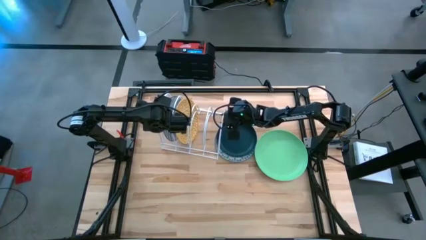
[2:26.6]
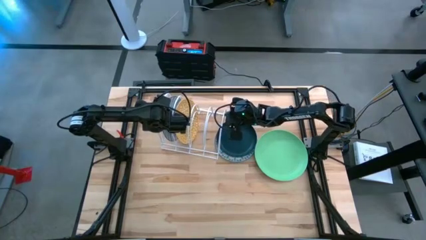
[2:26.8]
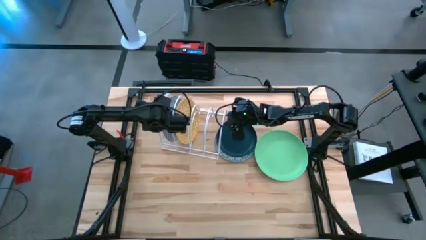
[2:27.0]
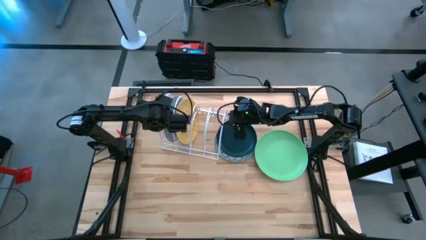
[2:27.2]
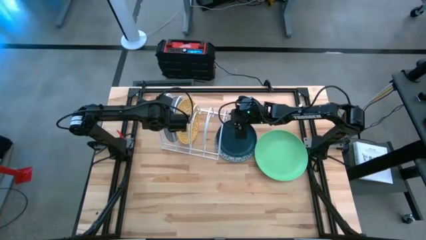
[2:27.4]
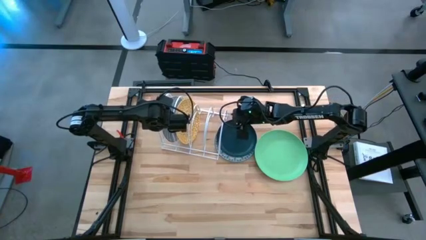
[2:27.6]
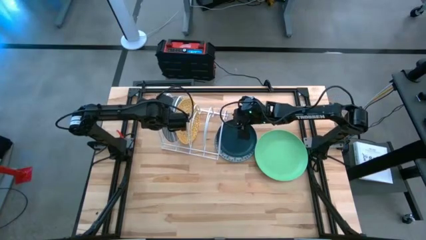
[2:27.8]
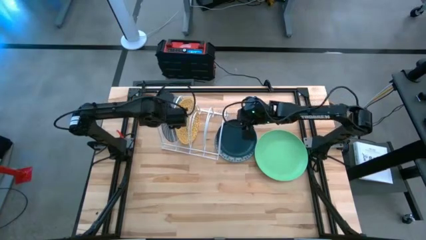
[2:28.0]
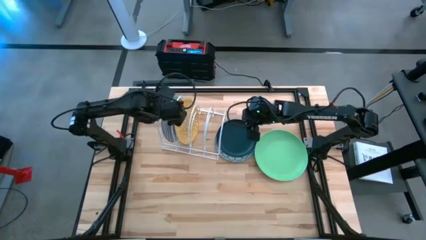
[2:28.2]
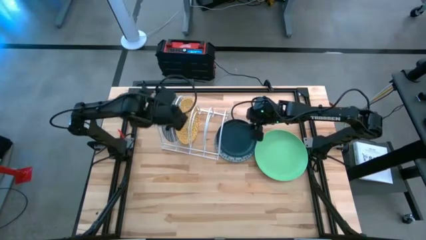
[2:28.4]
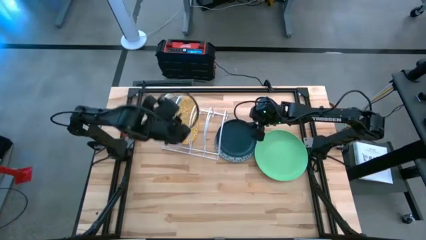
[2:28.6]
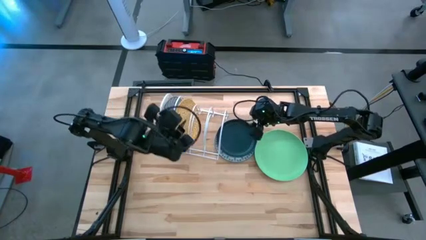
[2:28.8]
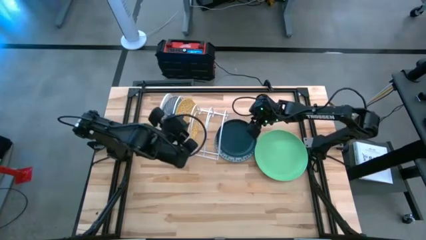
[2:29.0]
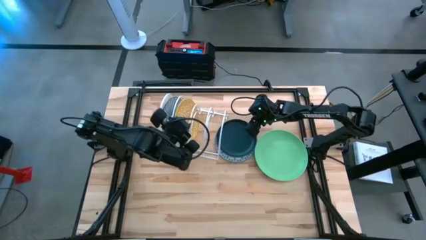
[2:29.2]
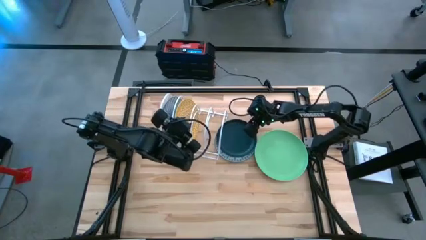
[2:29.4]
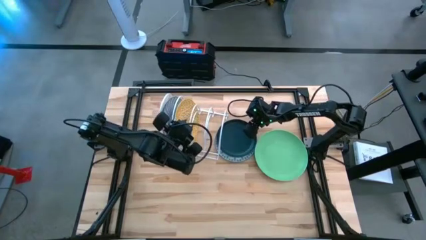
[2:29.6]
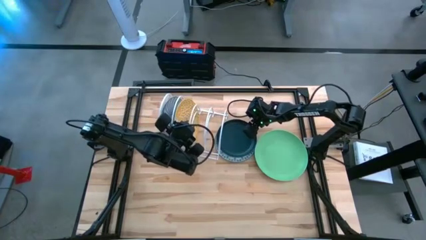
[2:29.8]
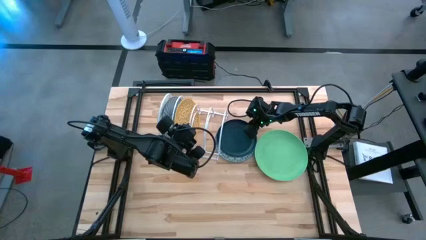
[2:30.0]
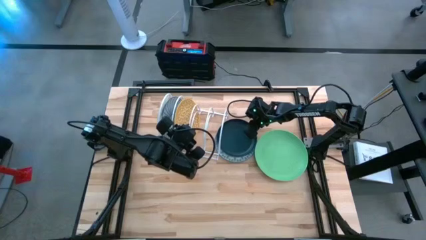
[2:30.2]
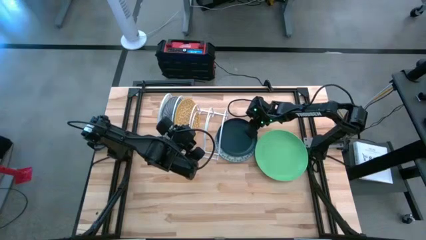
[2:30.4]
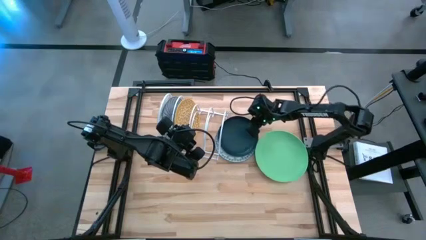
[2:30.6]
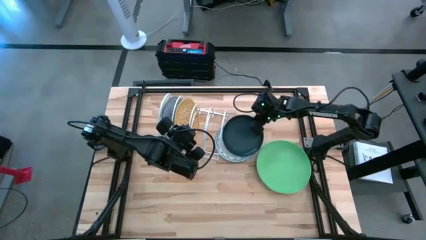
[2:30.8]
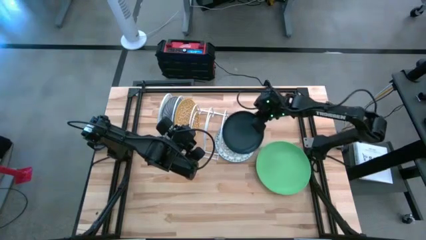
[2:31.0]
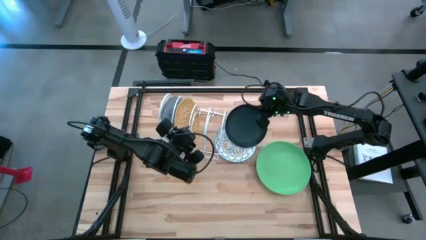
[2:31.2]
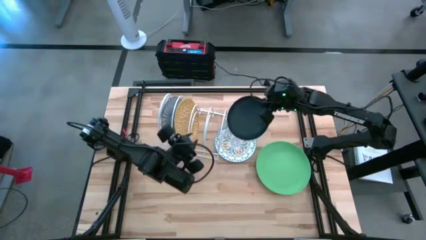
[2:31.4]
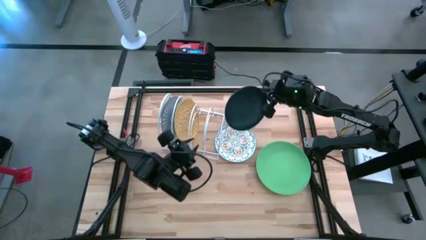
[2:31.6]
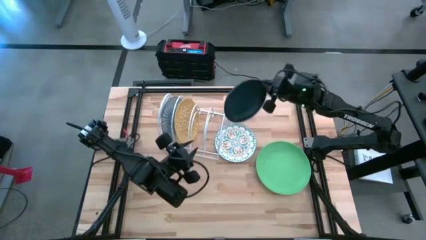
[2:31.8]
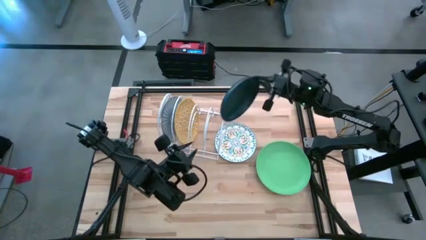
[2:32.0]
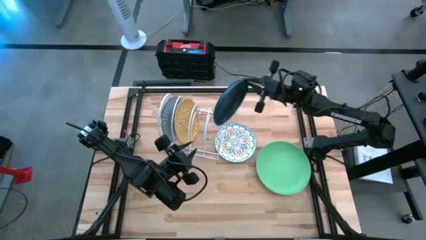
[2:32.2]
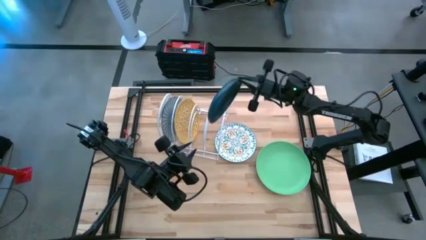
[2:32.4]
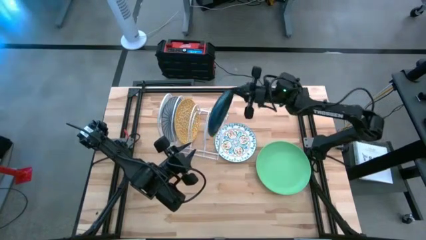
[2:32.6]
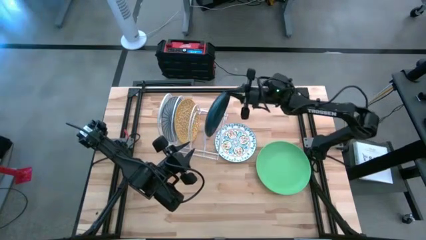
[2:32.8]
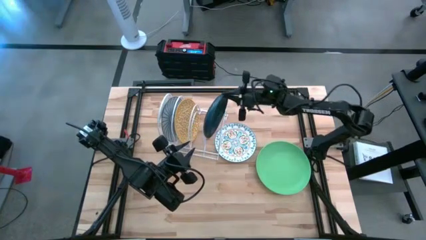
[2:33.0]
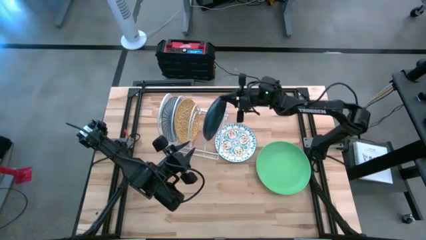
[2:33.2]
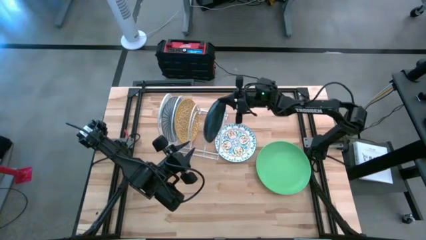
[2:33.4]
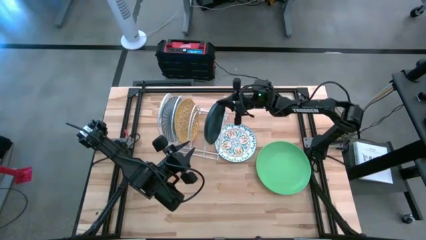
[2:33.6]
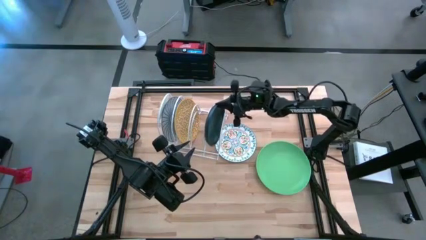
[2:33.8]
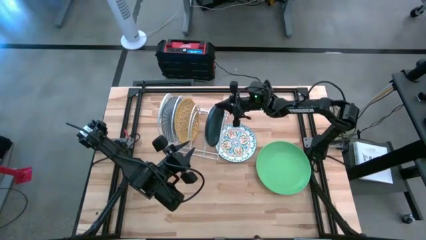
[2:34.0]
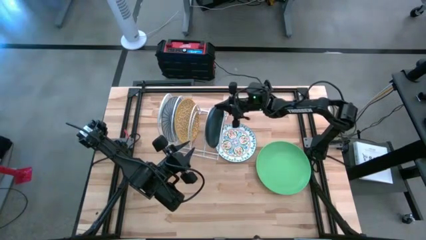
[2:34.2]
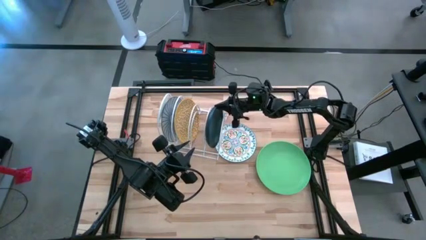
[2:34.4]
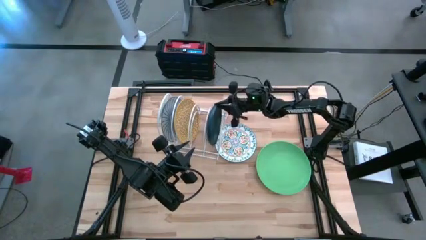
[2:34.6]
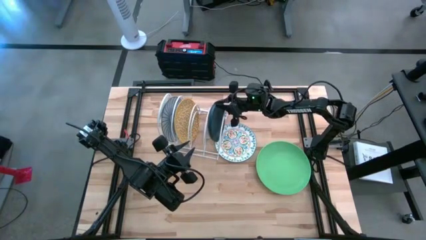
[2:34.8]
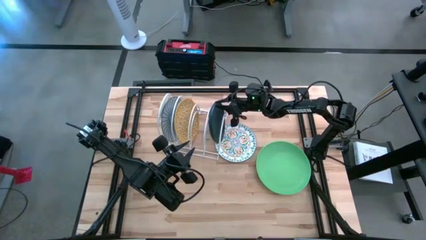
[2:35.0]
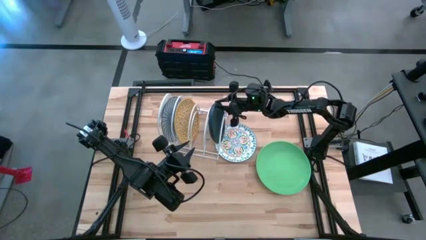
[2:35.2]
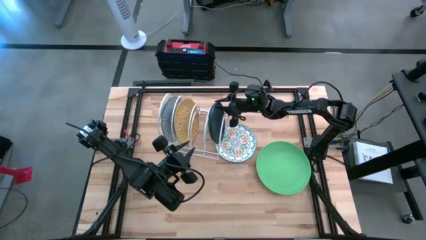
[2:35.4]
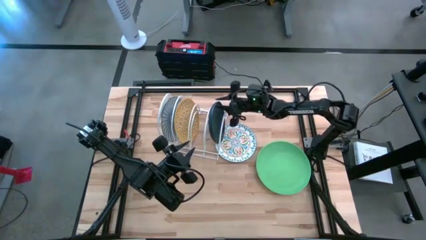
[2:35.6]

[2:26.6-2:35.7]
Task: Sort dishes
Put the dark green plate in the dish rack

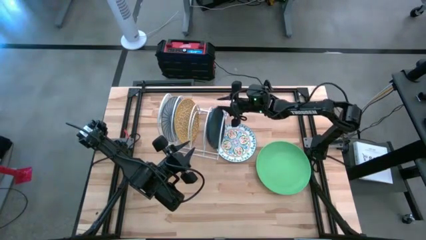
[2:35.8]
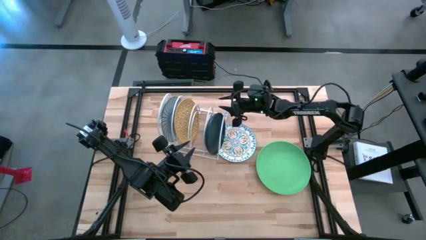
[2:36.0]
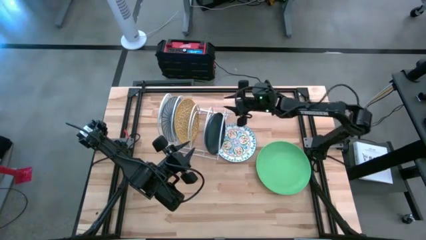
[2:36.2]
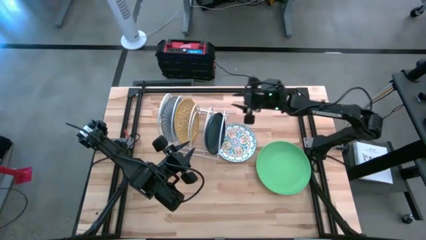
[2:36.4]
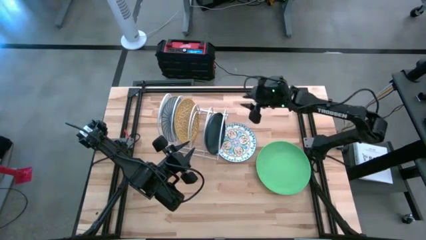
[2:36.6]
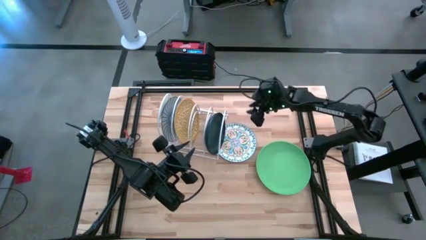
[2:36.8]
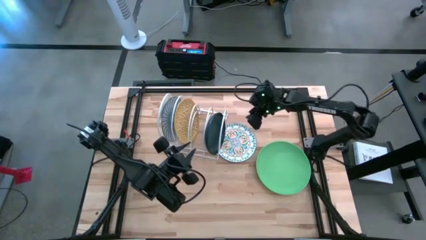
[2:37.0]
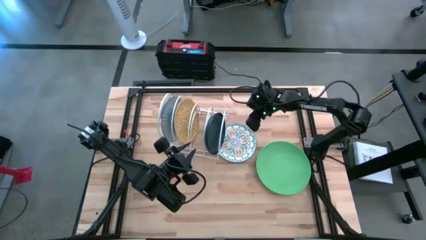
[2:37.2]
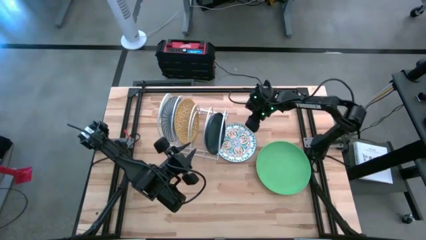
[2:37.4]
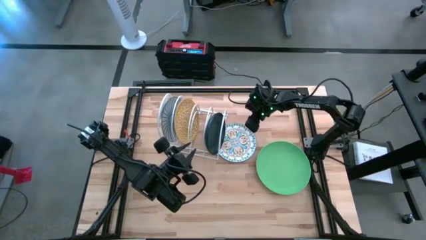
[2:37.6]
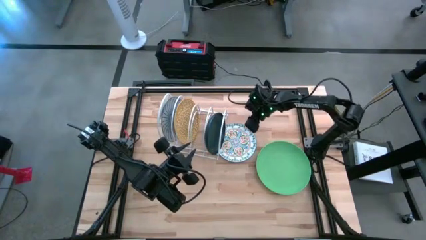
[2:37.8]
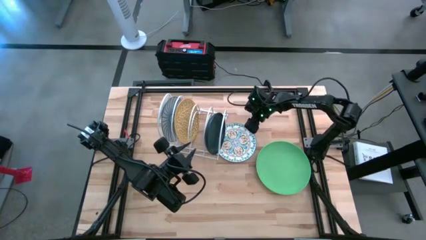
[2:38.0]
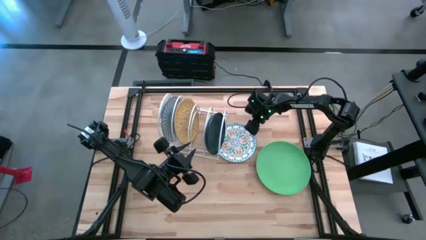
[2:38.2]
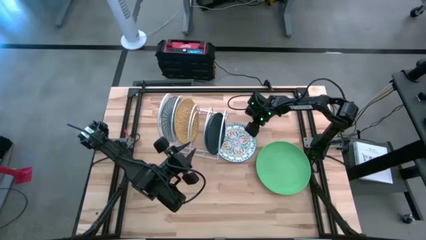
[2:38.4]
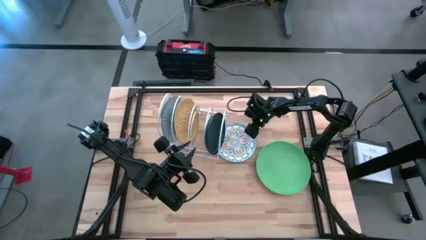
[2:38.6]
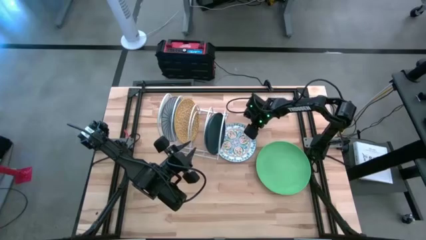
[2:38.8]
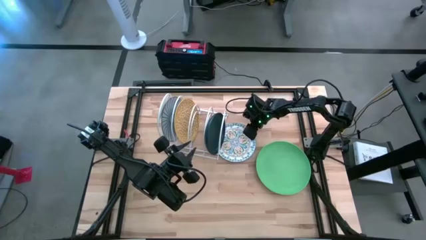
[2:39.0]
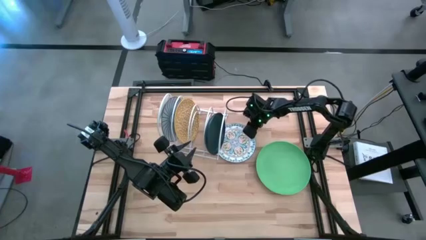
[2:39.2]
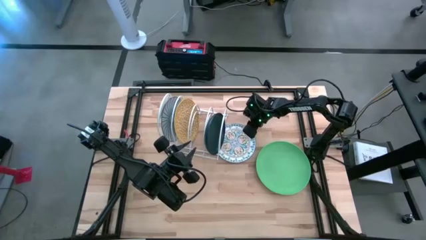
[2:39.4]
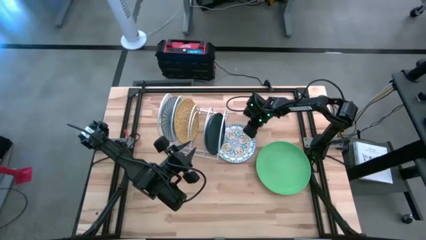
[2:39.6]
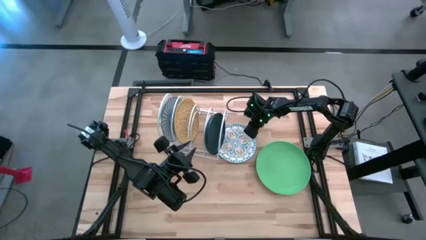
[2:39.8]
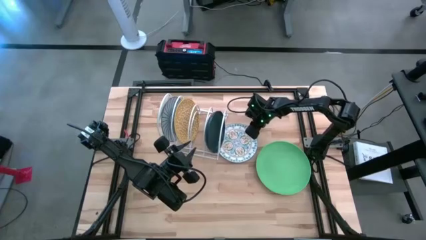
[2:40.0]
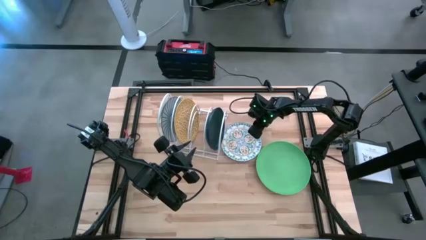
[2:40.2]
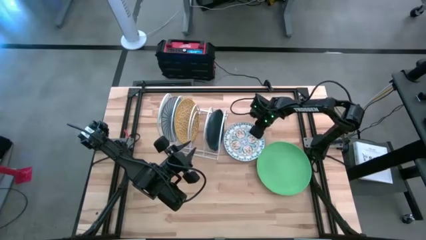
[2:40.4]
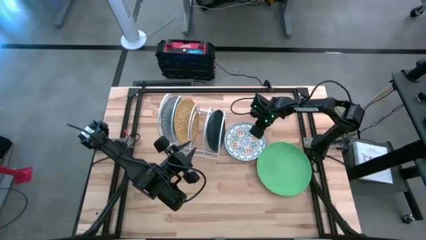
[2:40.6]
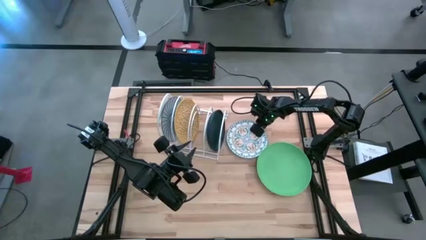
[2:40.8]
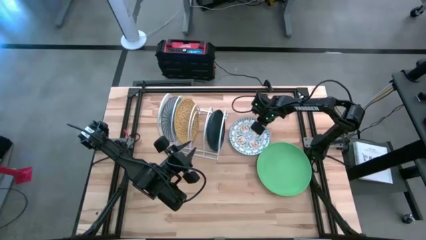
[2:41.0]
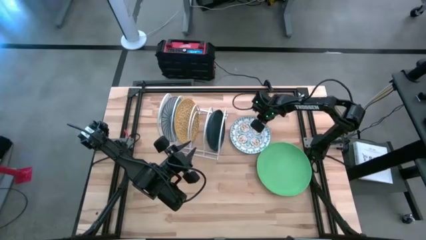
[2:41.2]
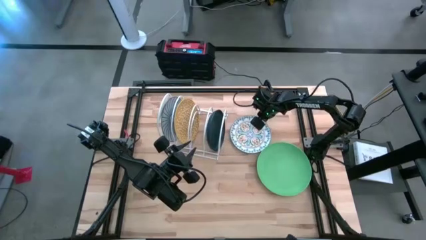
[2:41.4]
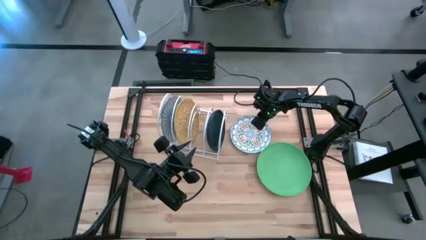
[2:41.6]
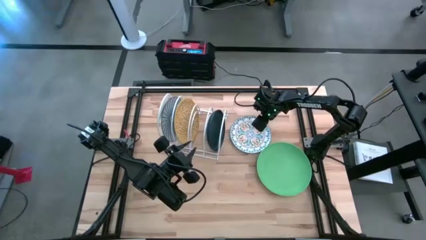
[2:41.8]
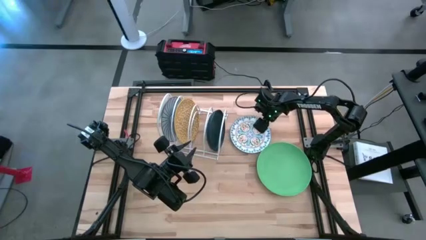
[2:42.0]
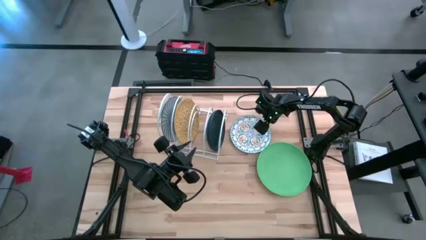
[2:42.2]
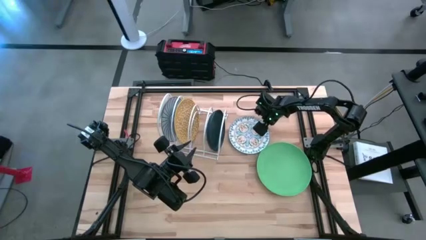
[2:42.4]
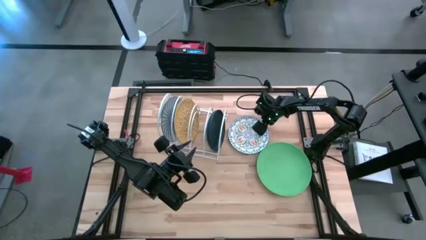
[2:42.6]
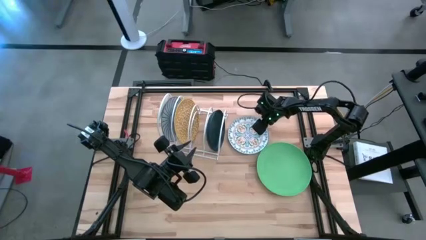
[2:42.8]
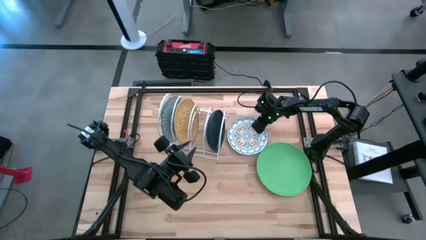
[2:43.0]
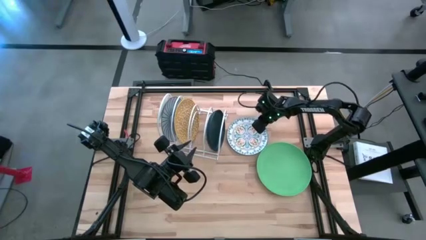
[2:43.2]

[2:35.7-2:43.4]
Put the the white plate in the dish rack
